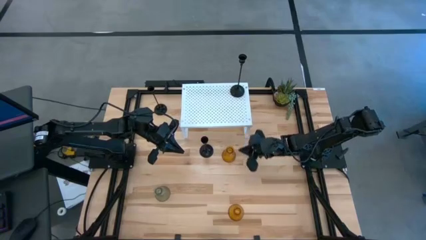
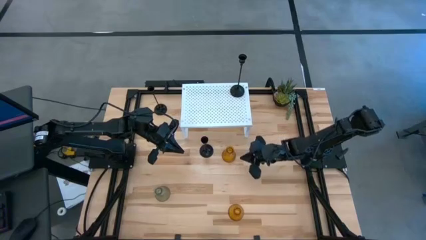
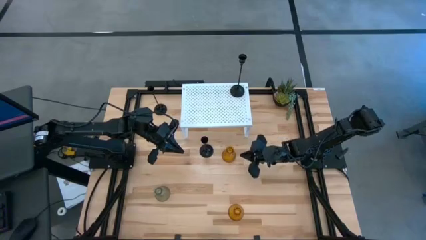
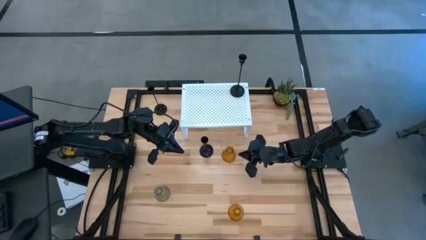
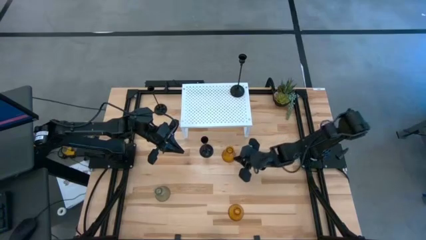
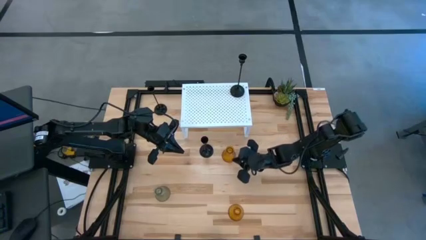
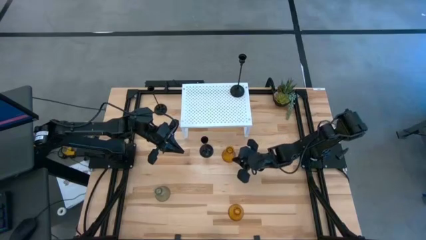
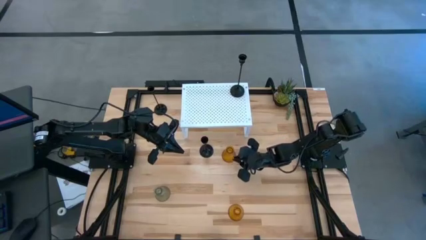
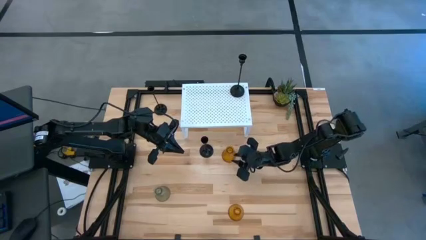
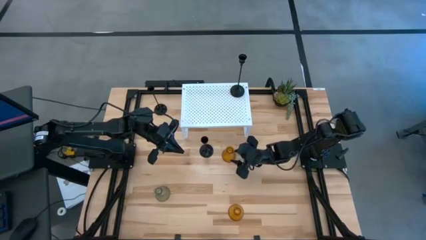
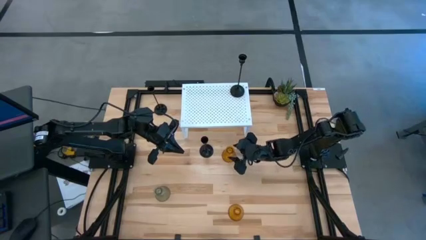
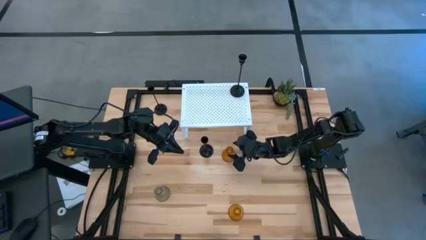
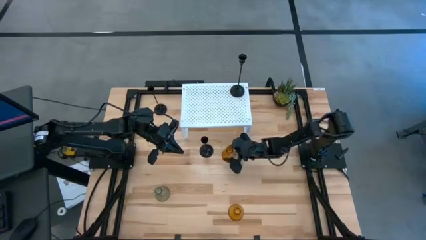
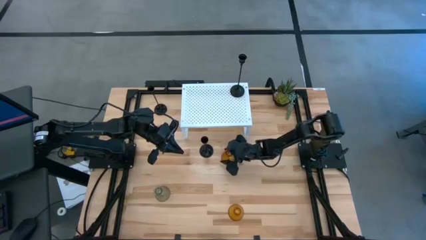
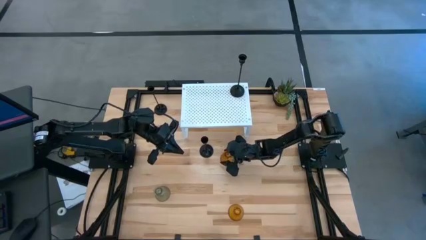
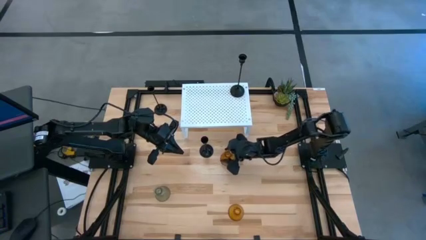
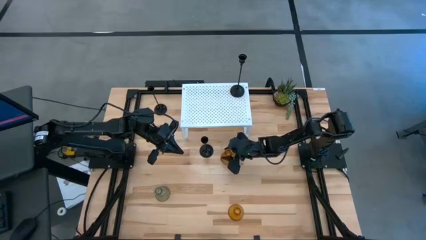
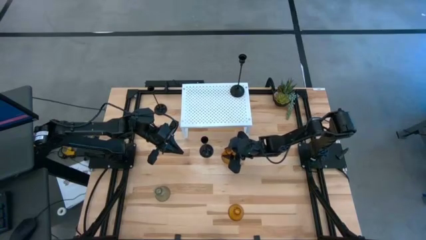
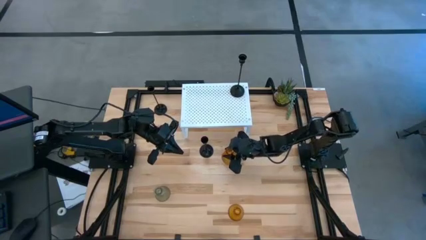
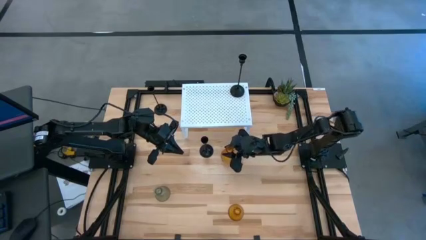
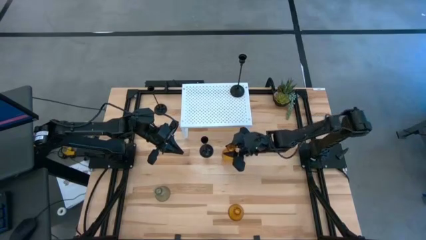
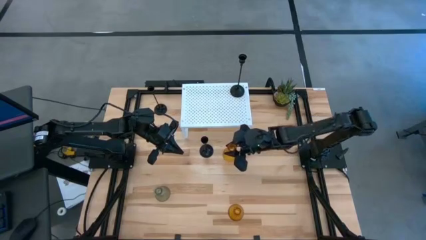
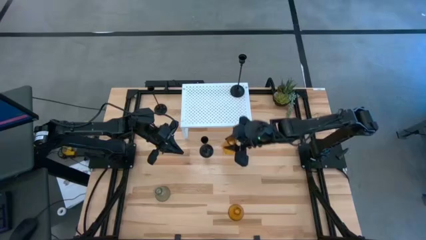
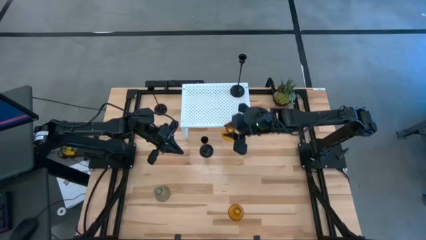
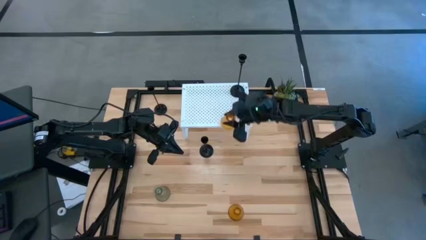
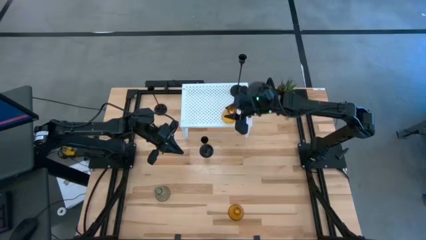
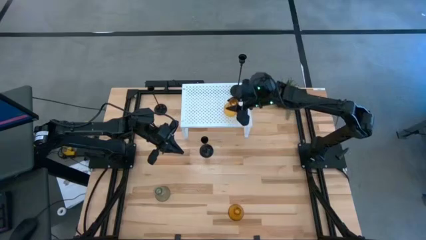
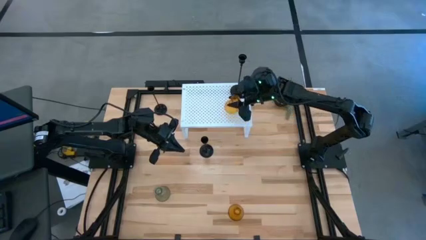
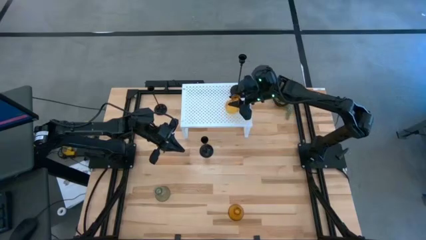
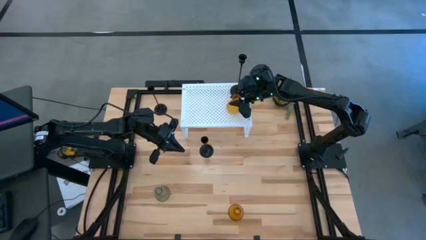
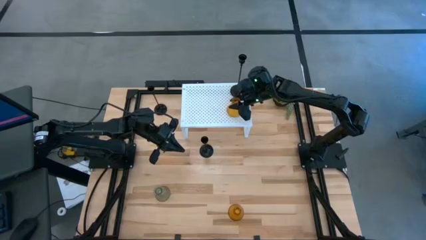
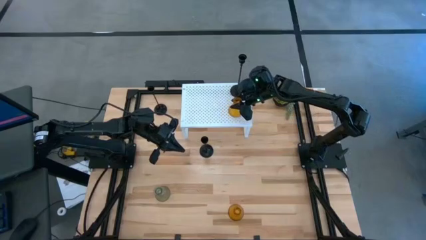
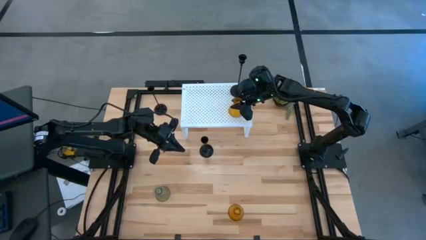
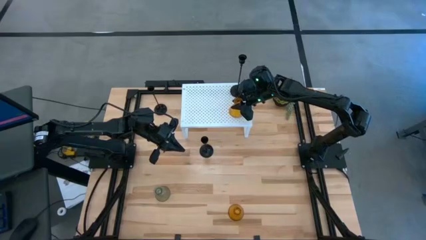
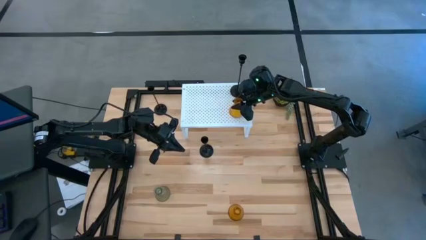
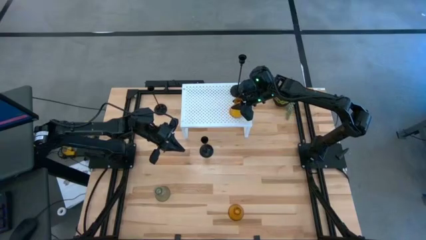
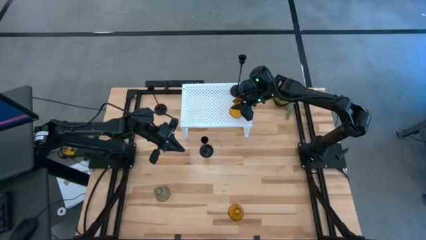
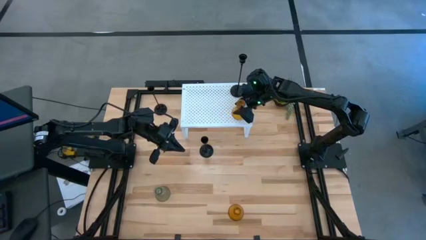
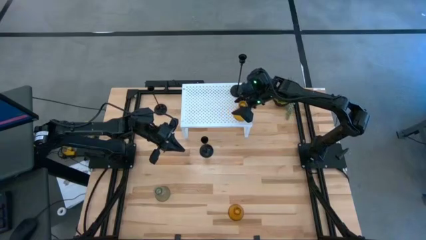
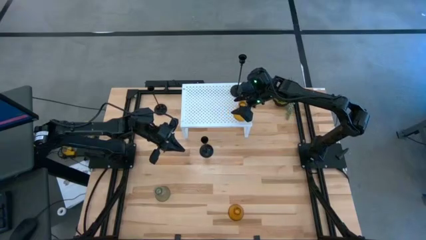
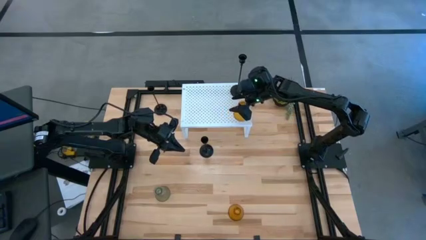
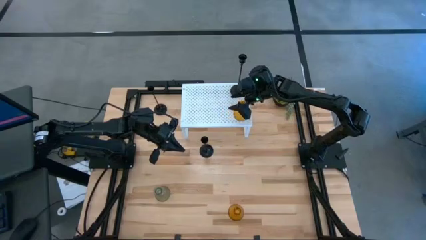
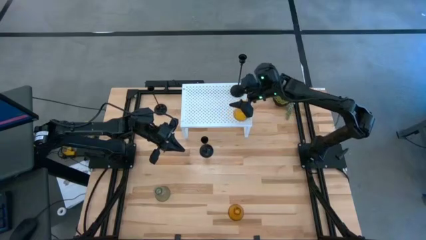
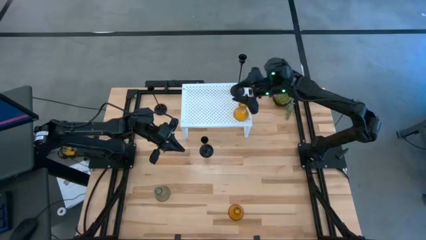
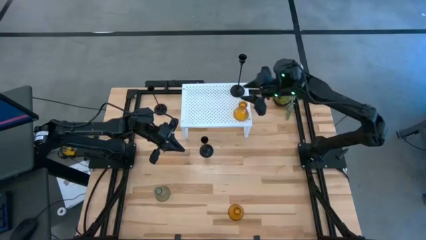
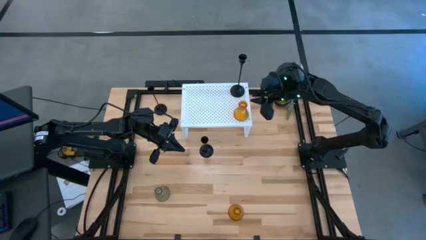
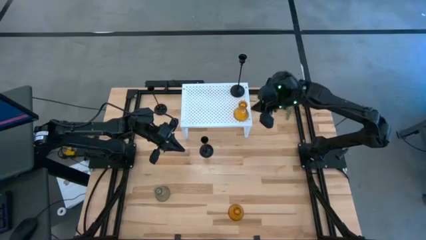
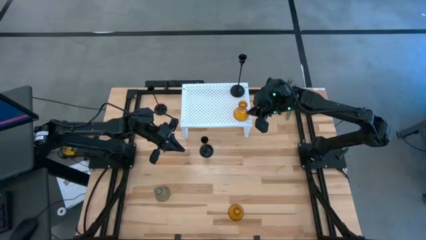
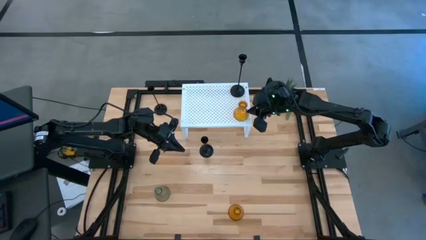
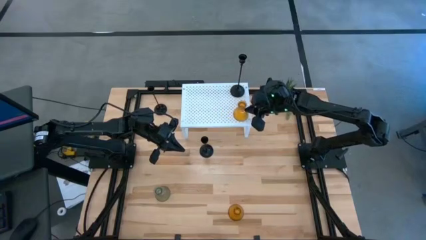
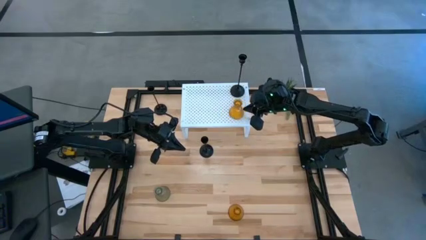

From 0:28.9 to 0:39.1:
Task: Pick & Place candle stick holders
Put the top orange candle holder on the shelf

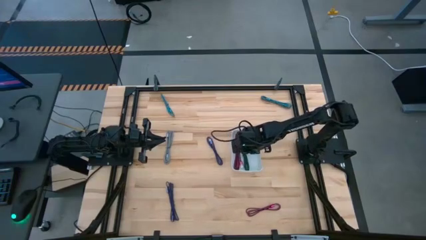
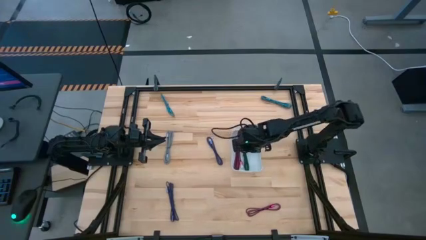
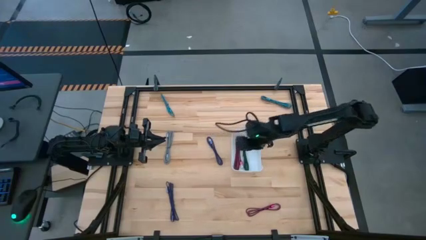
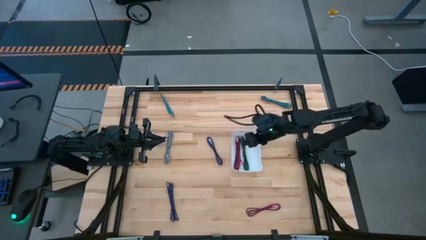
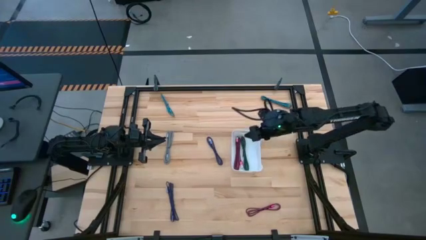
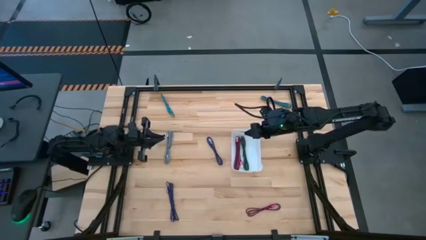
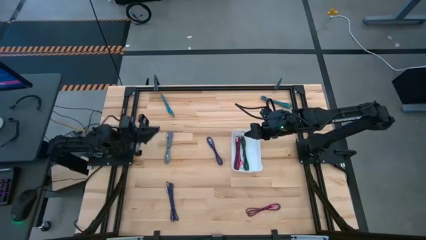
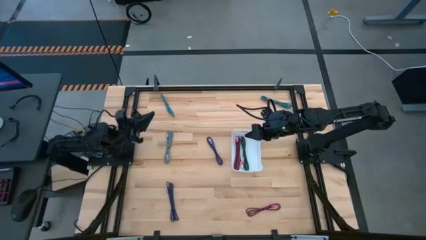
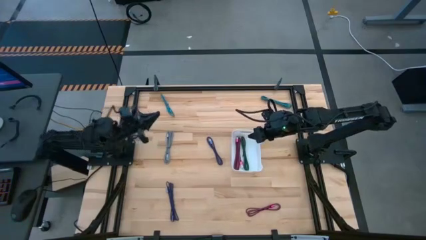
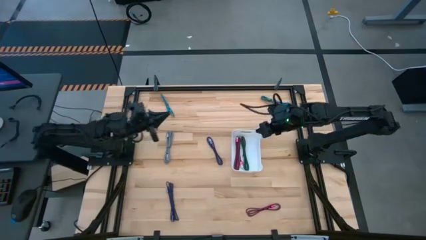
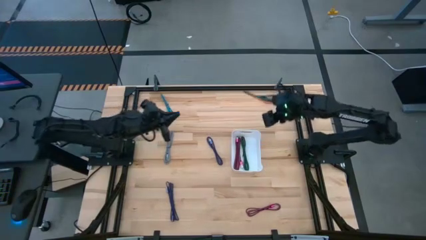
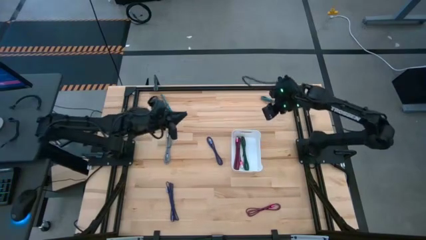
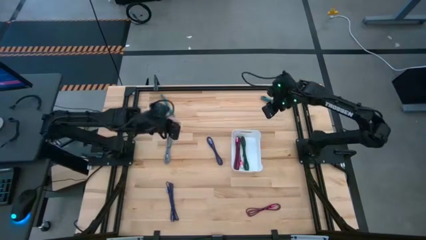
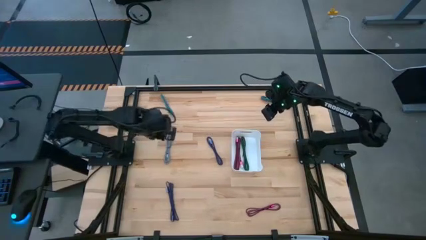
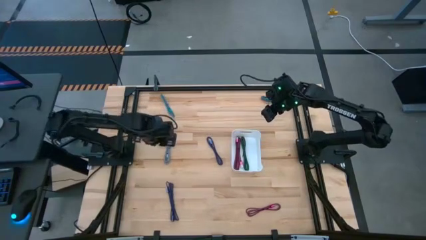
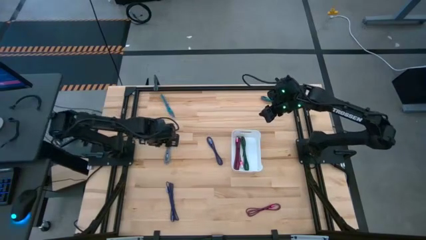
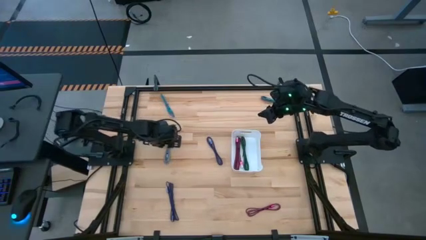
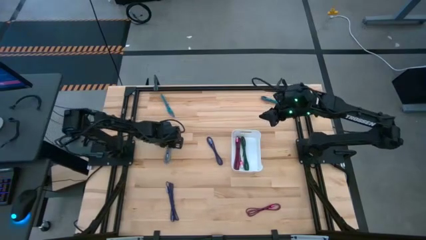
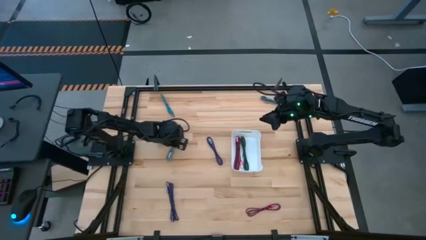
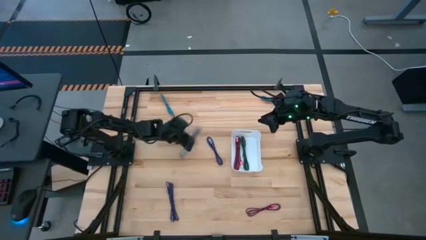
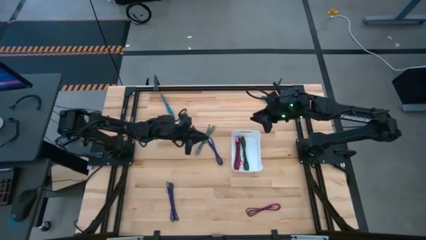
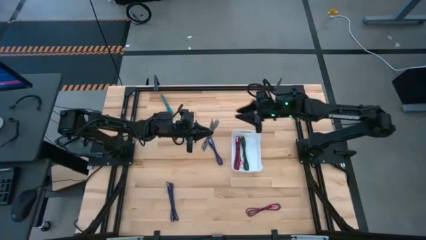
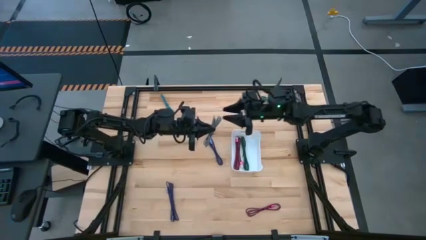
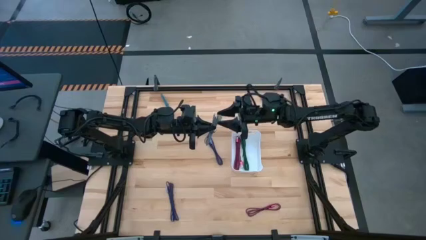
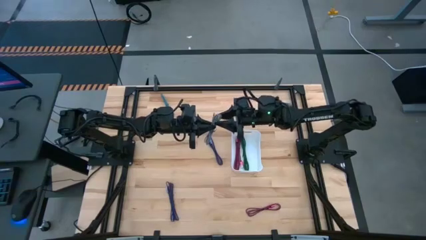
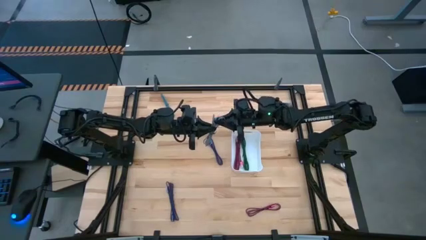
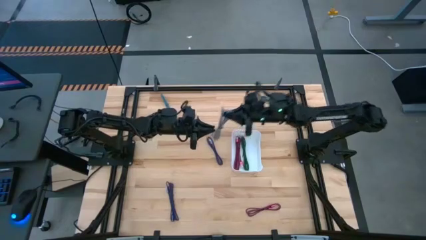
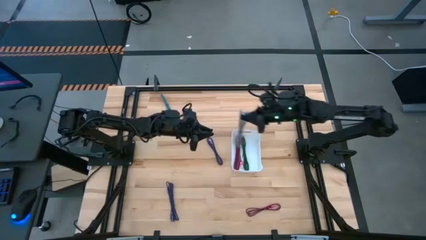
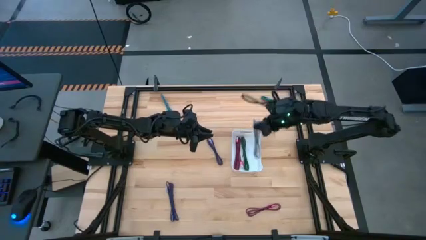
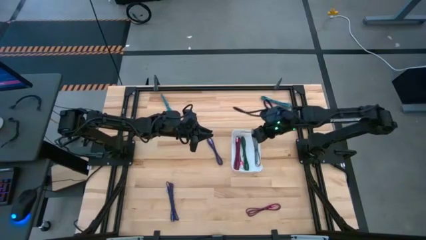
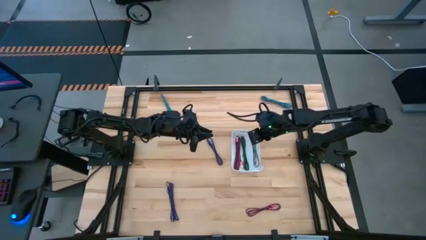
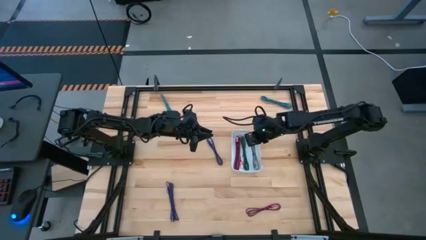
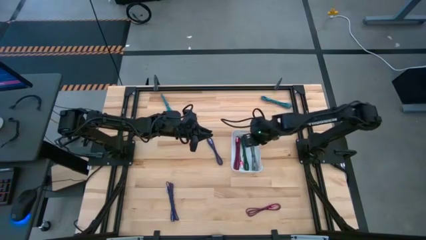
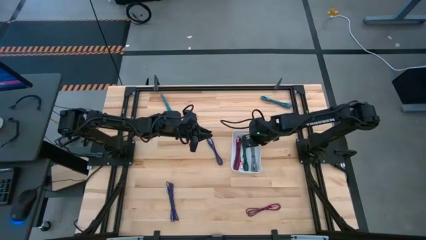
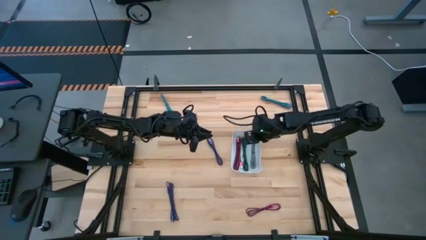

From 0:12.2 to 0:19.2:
Task: Pick and place USB-C Cables
Put the gray charger cable into the white bin
